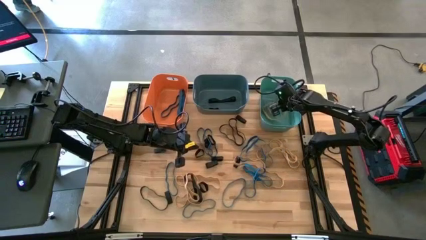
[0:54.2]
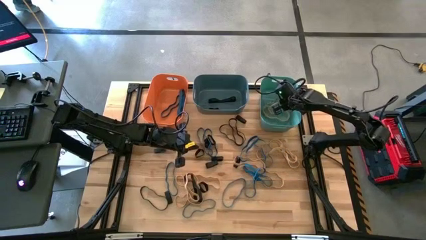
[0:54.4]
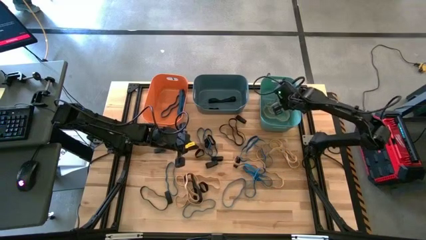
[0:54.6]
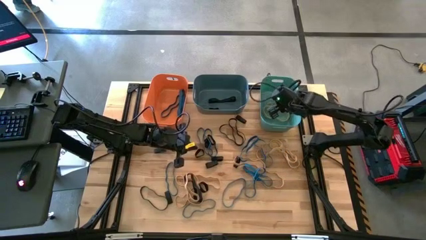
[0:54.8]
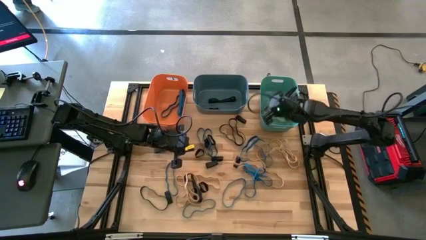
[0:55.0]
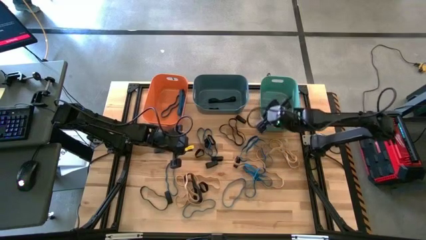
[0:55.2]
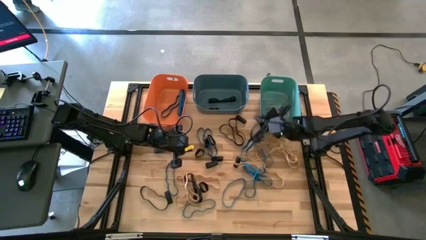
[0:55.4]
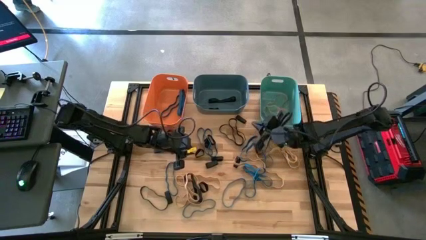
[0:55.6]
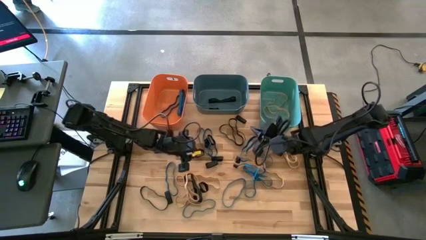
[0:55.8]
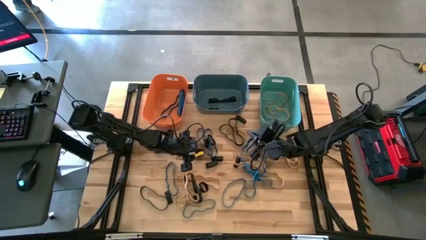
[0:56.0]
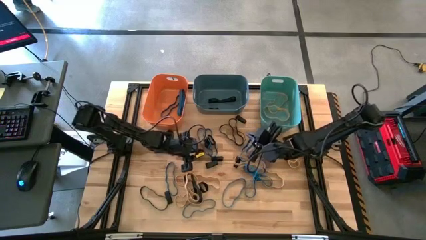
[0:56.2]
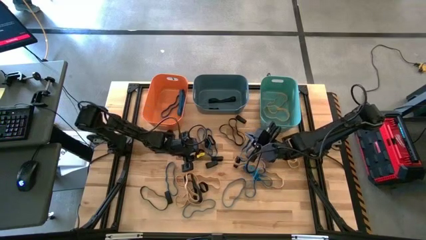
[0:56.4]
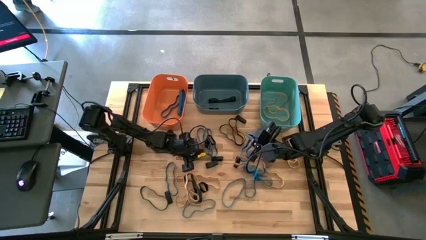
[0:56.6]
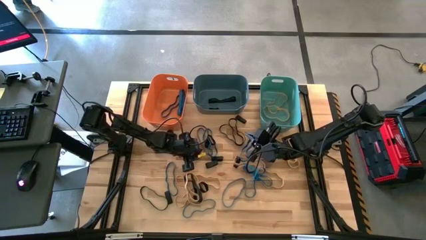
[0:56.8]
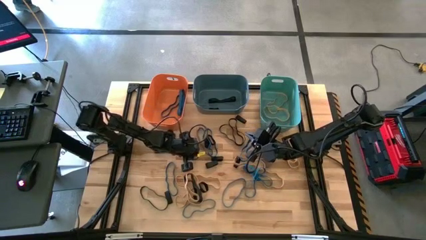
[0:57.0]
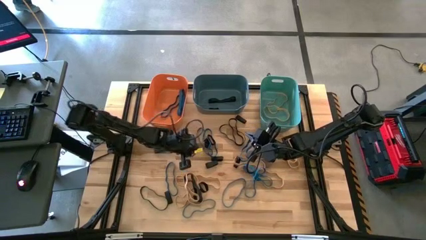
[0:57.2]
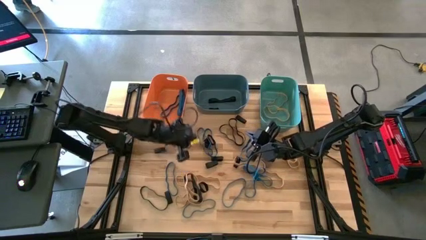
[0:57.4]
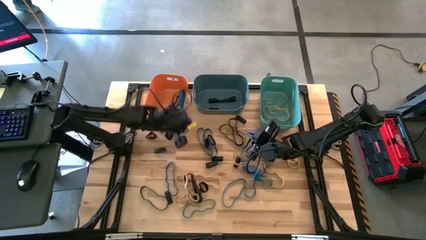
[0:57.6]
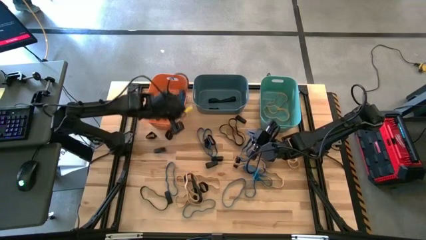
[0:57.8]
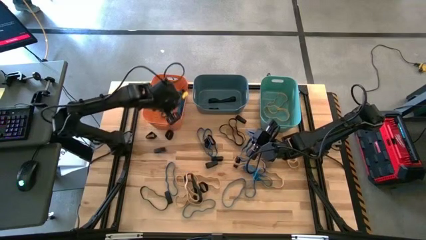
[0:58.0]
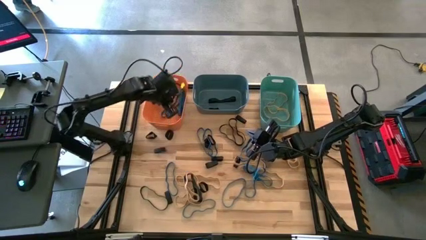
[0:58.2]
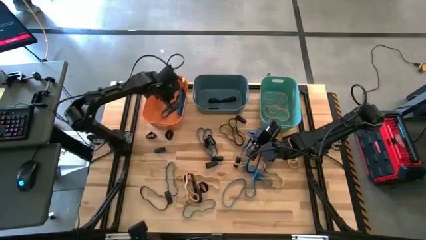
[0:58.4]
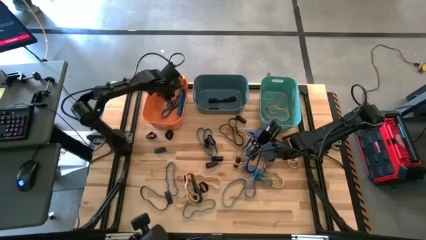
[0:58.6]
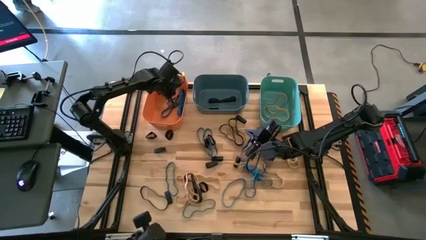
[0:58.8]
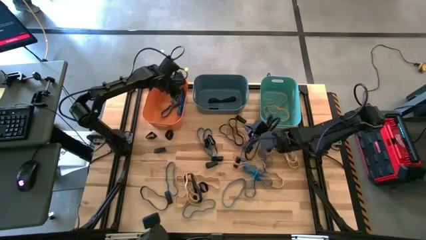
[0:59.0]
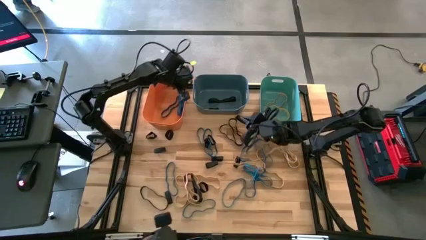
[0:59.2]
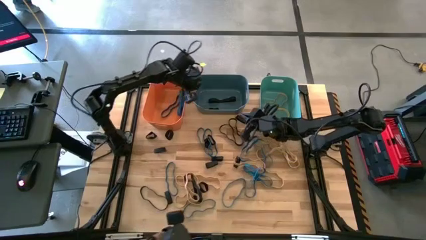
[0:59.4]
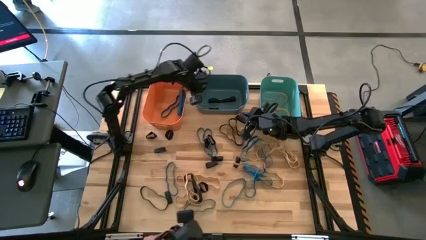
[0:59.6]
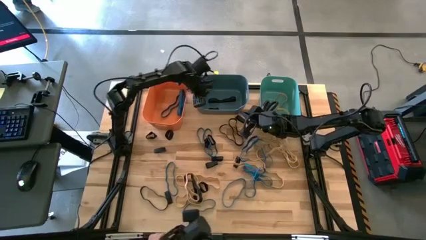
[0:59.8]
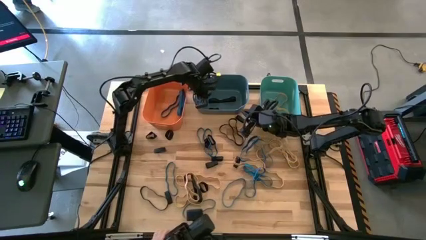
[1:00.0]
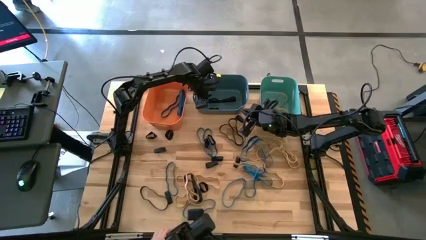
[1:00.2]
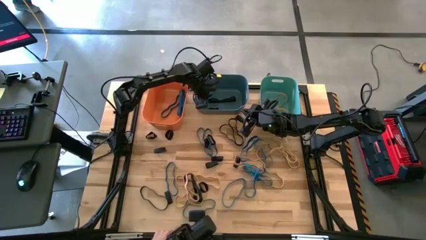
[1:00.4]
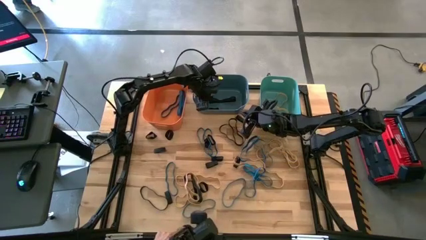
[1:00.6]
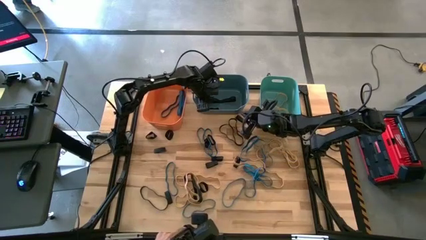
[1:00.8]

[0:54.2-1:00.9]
Task: Sort rubber bands into baskets
Put the black rubber band into the blue bin

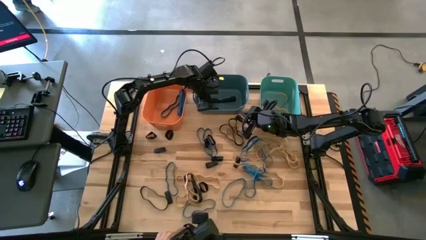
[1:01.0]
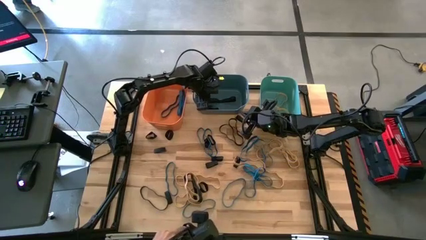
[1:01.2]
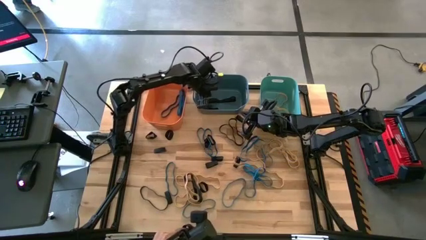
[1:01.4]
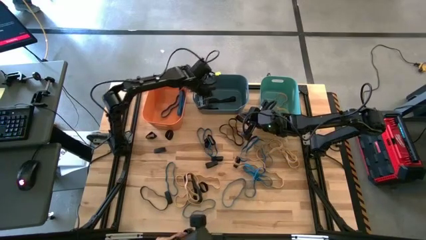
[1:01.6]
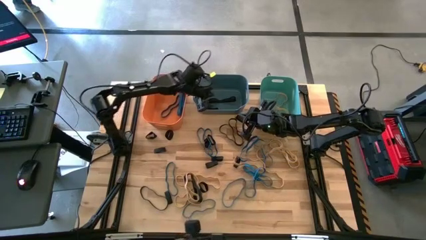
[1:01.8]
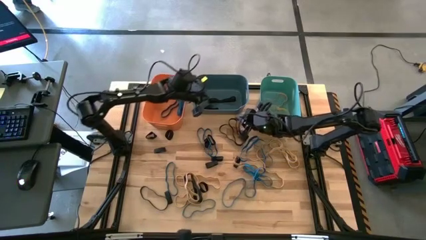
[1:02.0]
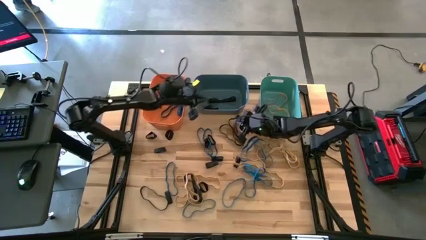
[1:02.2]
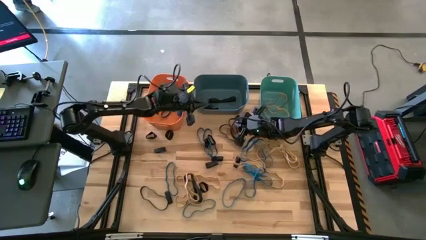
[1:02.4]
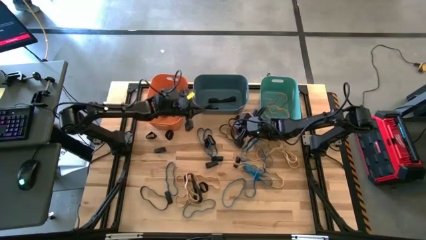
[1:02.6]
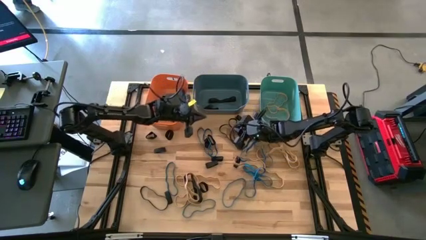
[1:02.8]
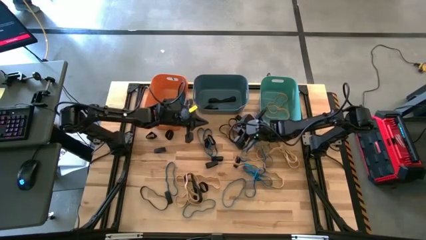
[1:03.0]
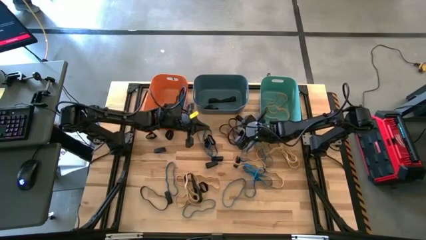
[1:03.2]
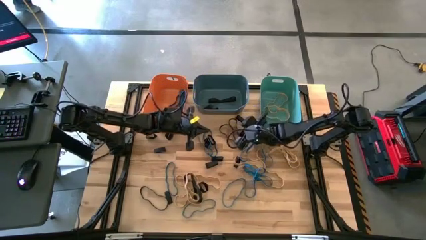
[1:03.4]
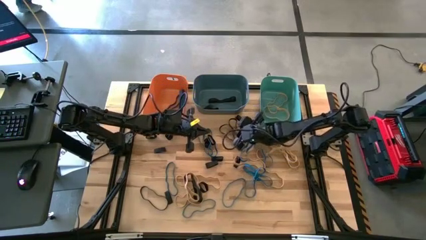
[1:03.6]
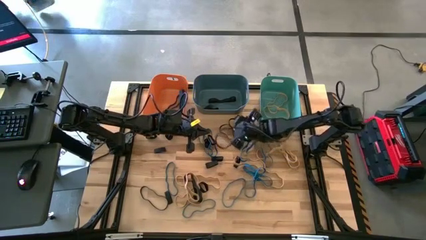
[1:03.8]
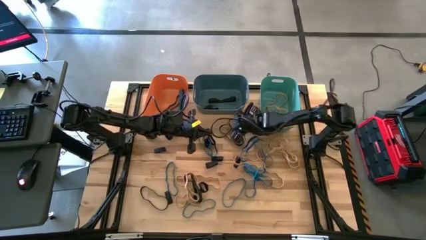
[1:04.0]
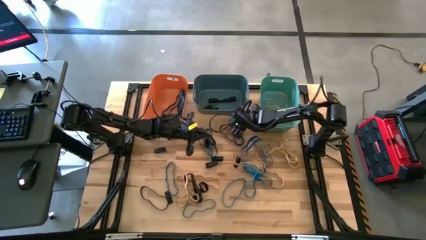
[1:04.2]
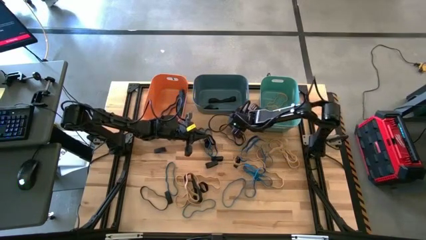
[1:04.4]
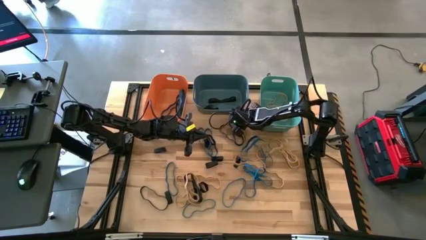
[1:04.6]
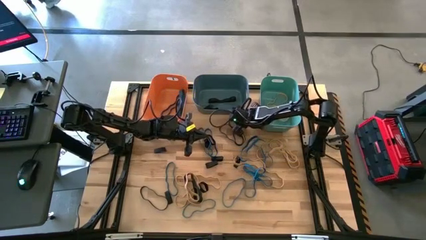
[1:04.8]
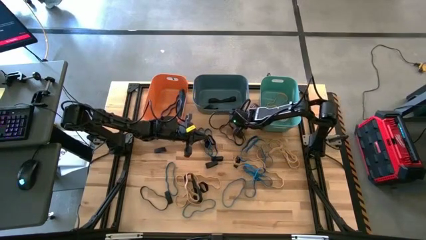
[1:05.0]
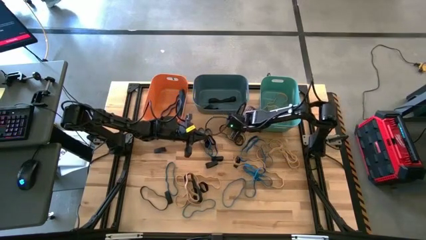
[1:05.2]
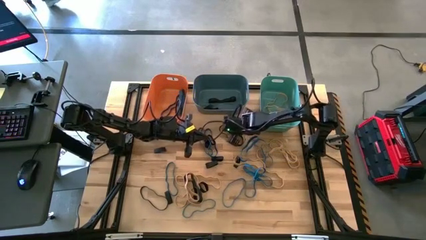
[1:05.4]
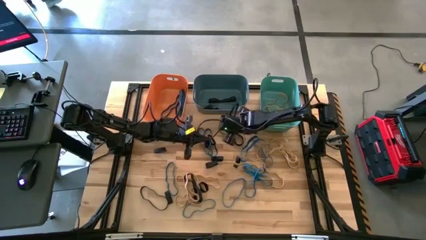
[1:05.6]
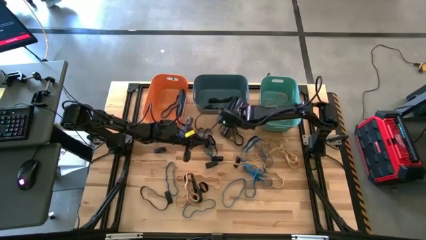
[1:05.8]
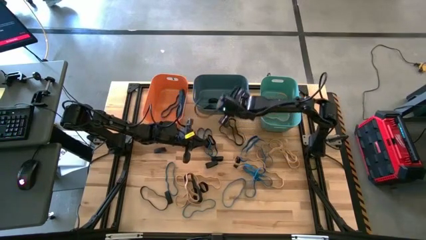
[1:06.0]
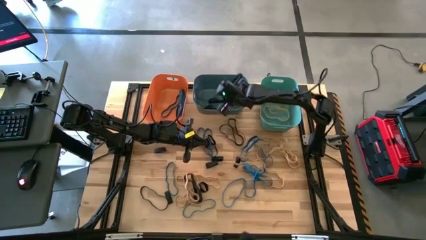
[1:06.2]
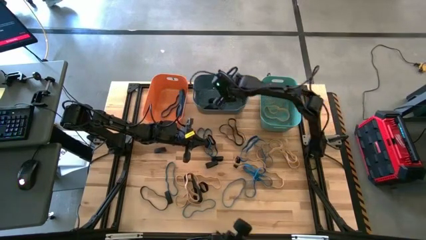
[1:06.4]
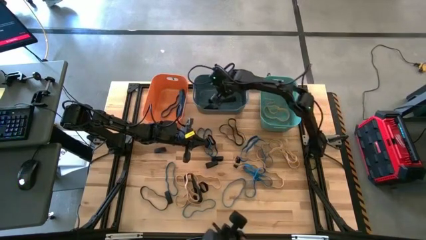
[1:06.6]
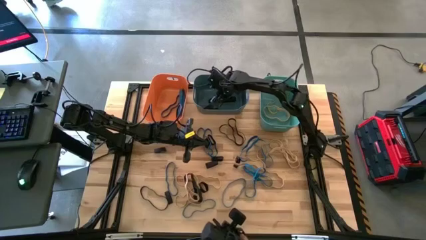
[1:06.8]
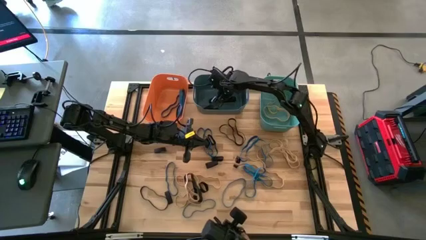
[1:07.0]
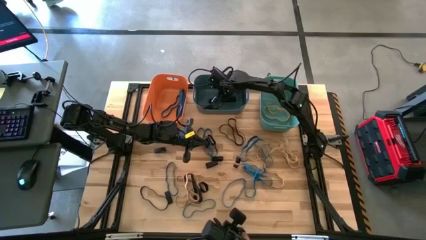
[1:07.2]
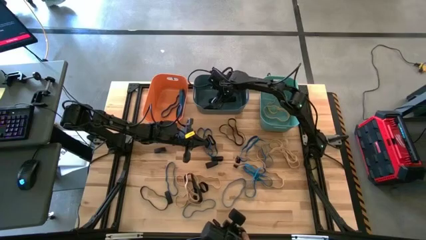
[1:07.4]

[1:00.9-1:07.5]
Put the black rubber band into the blue bin

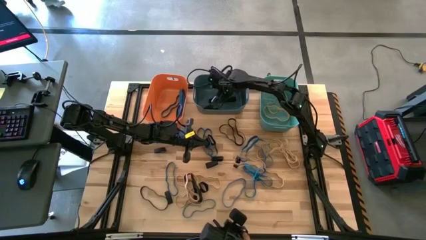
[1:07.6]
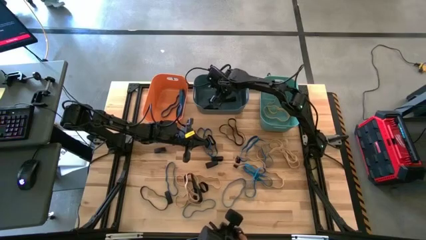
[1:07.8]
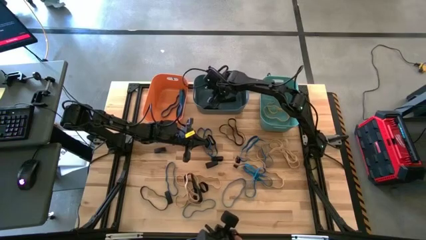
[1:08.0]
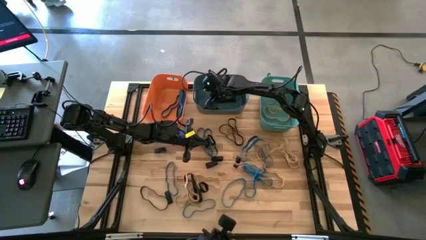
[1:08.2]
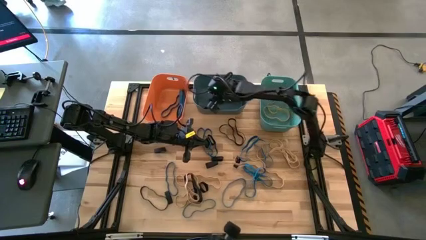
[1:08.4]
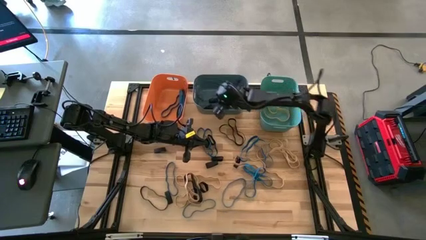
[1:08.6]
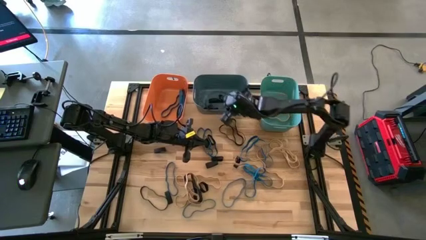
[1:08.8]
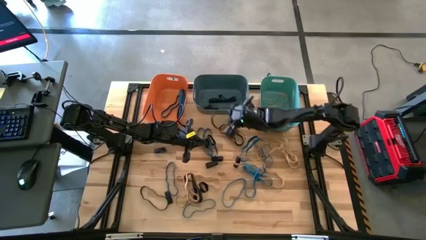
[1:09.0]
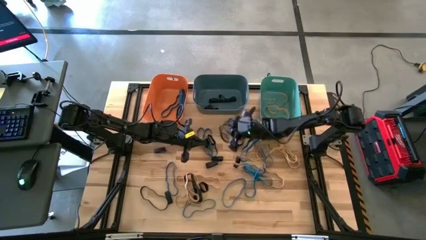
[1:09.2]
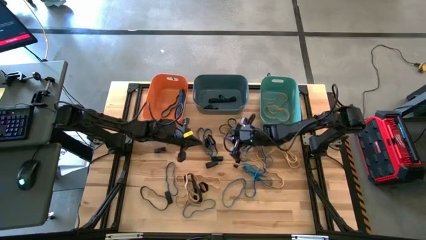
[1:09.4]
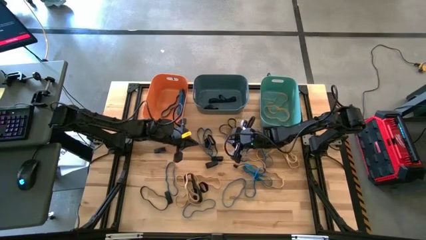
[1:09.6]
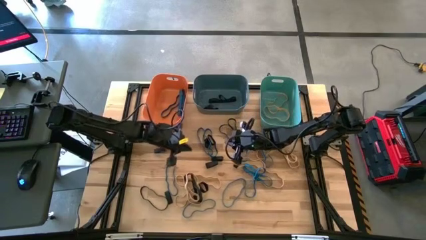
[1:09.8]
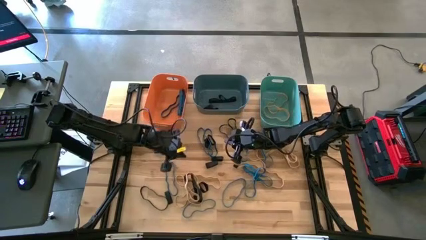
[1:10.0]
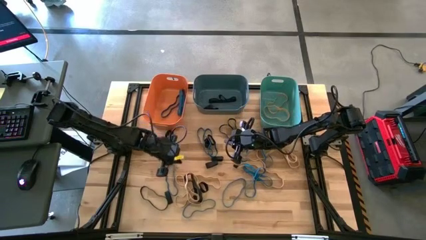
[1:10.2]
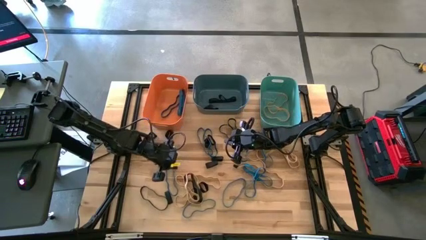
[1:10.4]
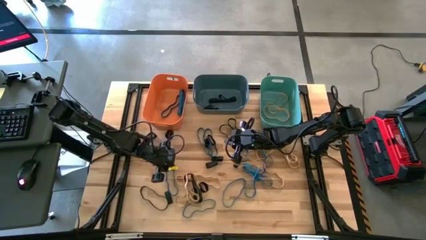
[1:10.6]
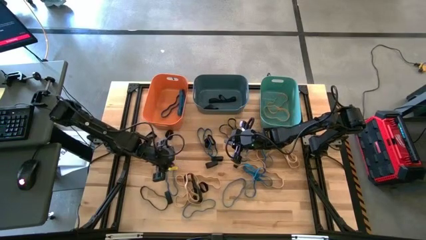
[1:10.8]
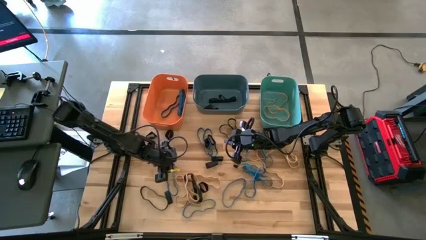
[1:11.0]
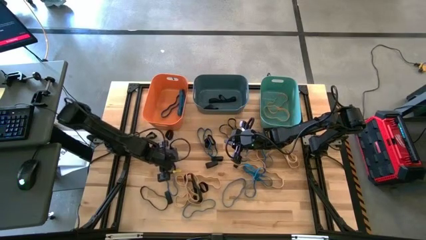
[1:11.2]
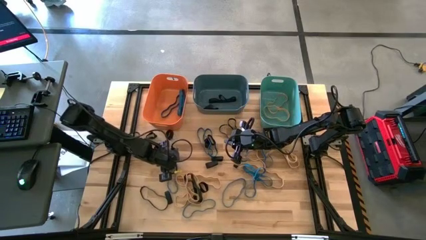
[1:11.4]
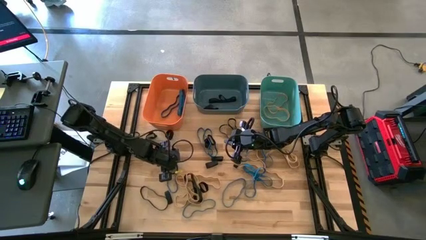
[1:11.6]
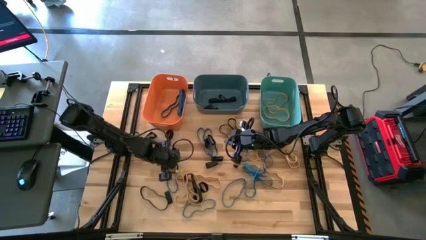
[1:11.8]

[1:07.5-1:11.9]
Put the blue rubber band into the orange bin
